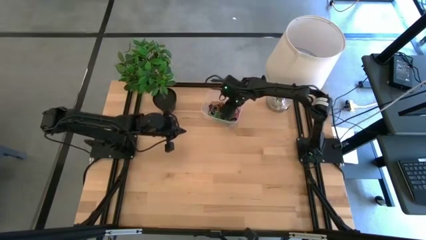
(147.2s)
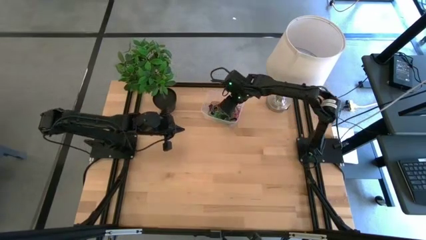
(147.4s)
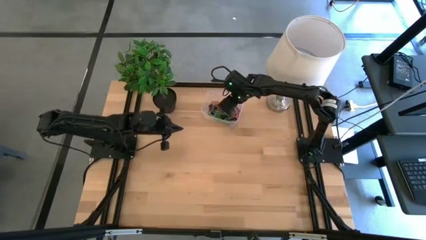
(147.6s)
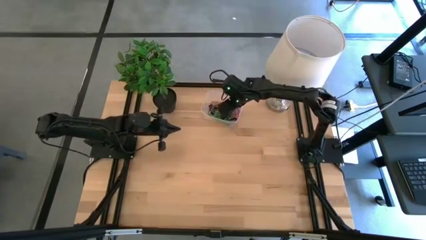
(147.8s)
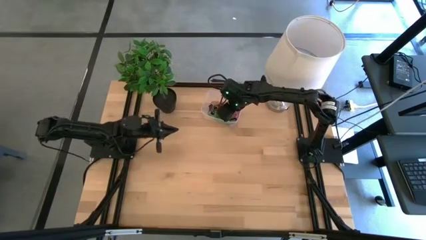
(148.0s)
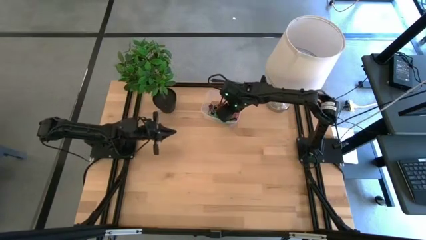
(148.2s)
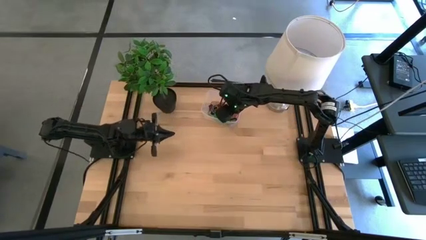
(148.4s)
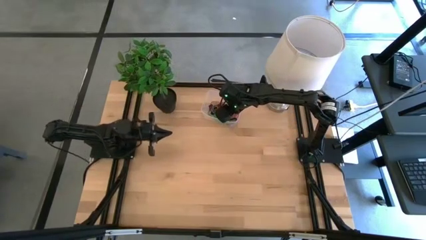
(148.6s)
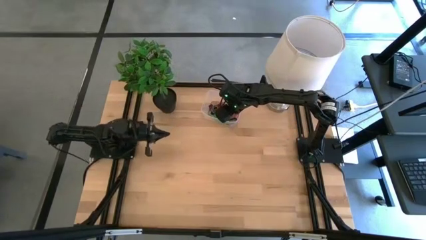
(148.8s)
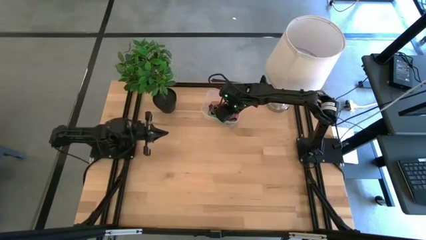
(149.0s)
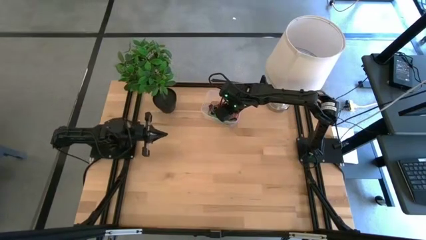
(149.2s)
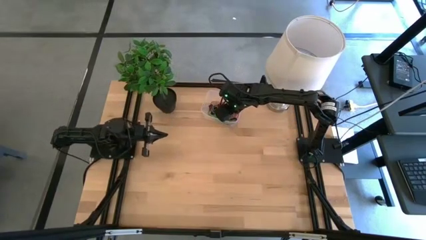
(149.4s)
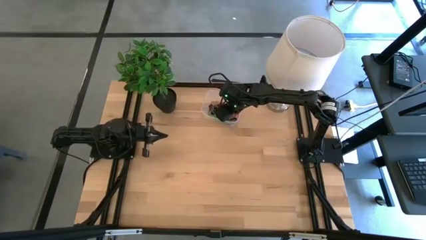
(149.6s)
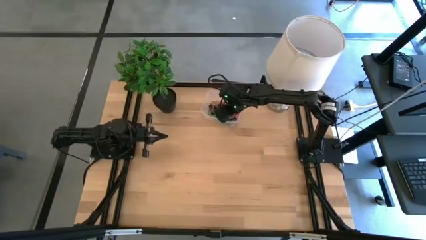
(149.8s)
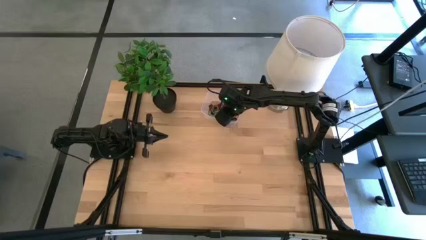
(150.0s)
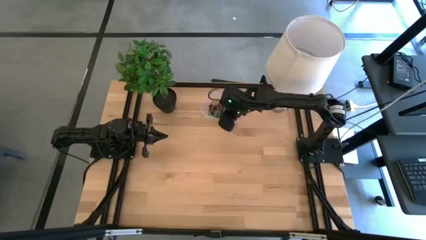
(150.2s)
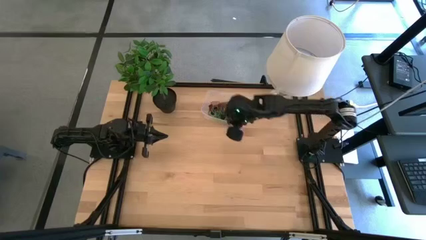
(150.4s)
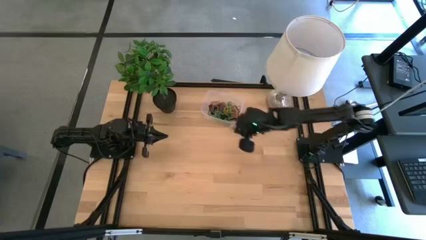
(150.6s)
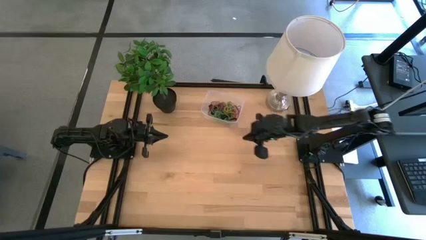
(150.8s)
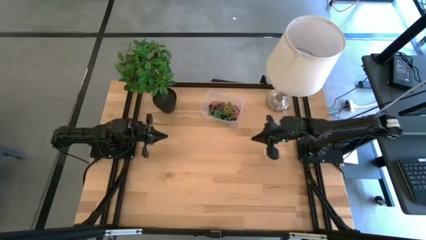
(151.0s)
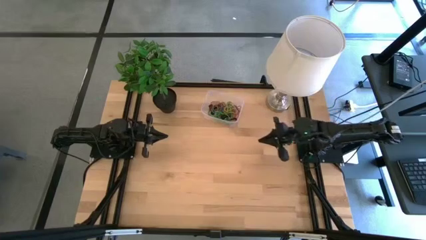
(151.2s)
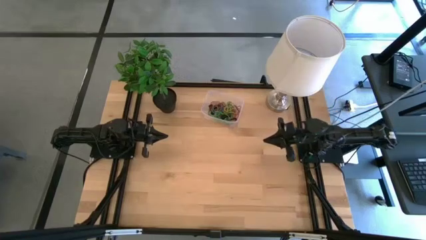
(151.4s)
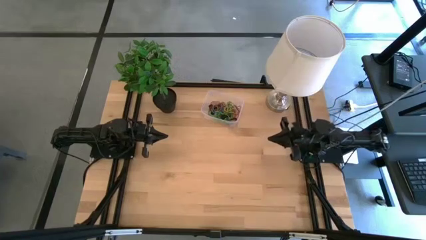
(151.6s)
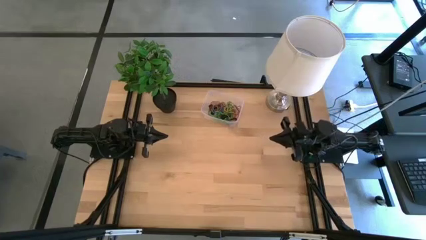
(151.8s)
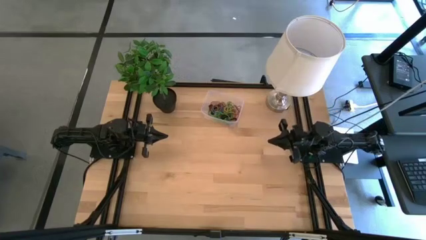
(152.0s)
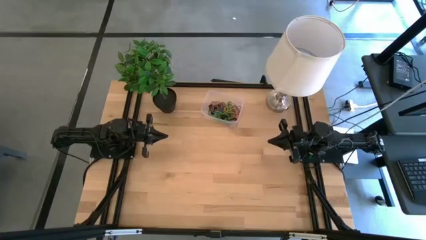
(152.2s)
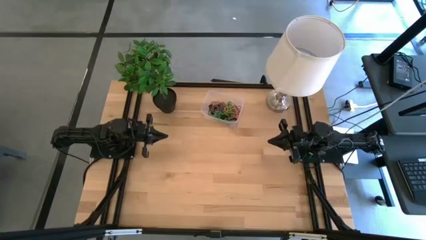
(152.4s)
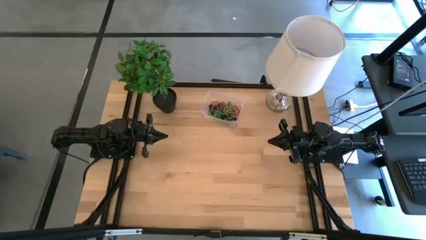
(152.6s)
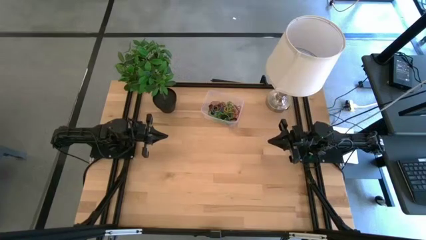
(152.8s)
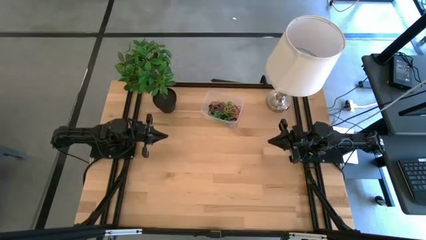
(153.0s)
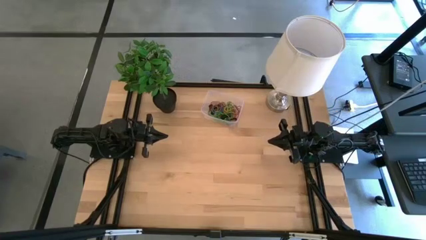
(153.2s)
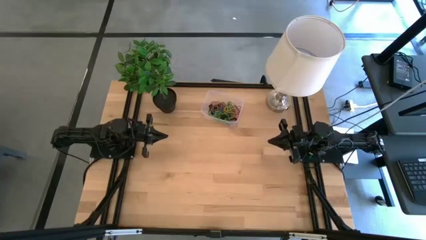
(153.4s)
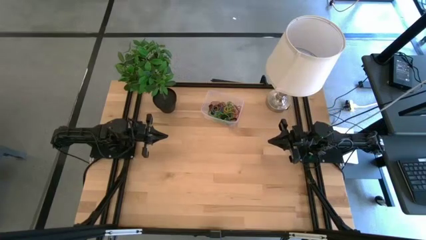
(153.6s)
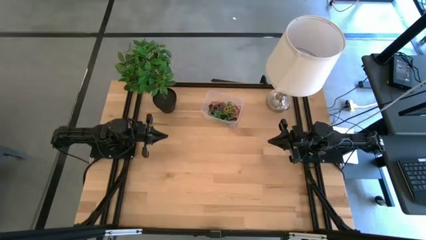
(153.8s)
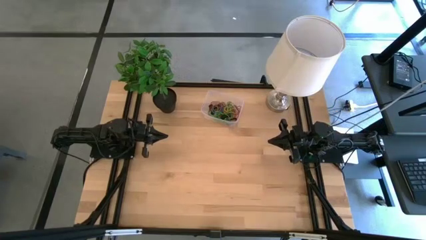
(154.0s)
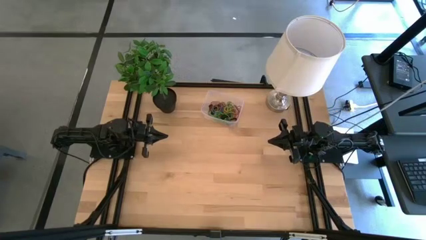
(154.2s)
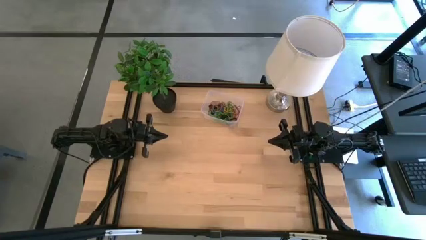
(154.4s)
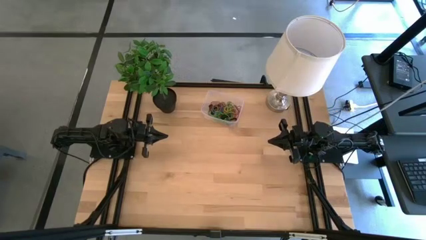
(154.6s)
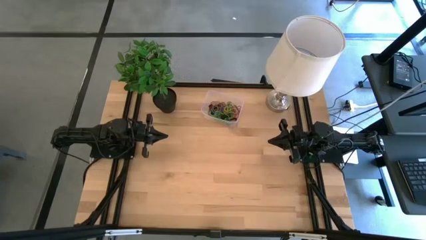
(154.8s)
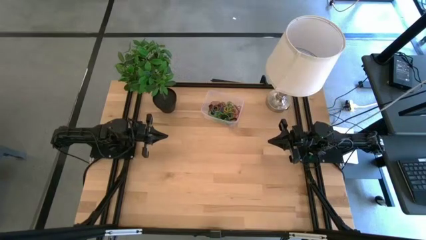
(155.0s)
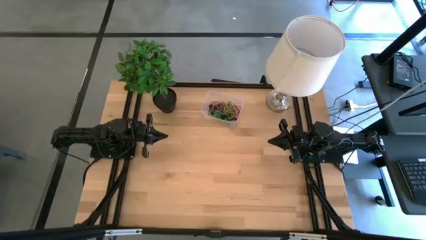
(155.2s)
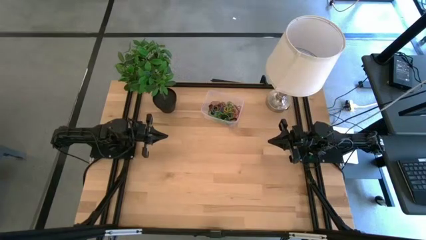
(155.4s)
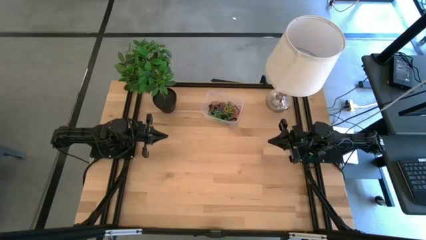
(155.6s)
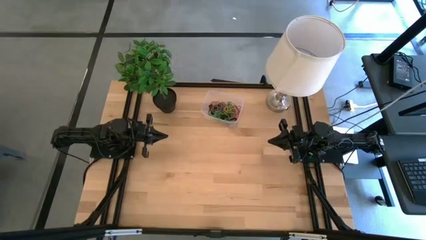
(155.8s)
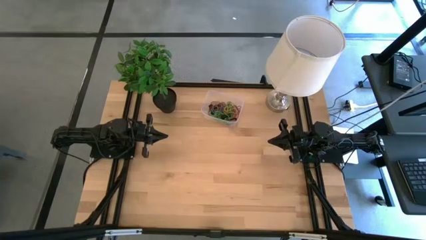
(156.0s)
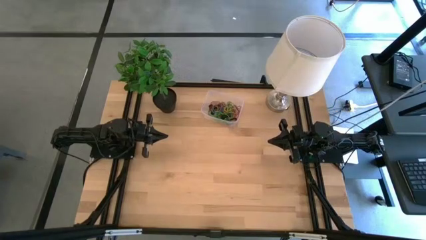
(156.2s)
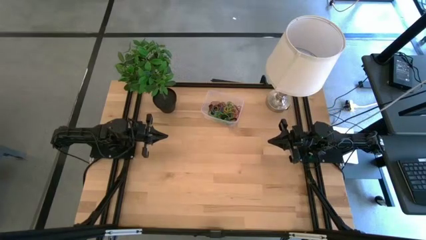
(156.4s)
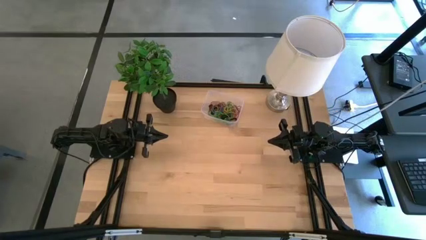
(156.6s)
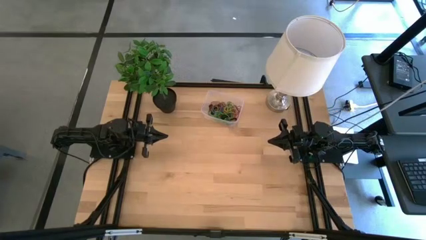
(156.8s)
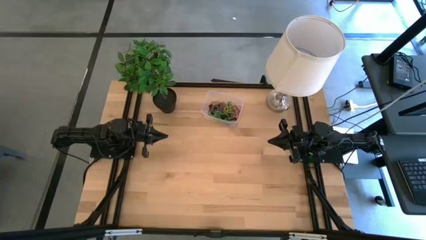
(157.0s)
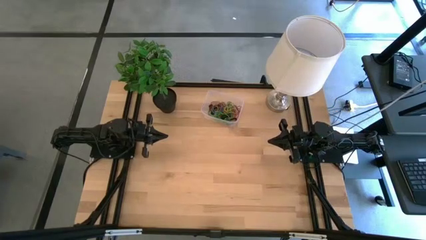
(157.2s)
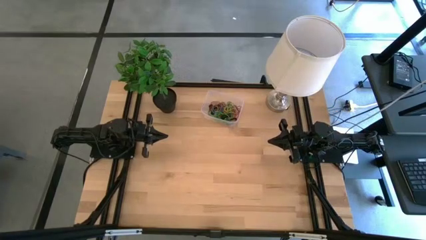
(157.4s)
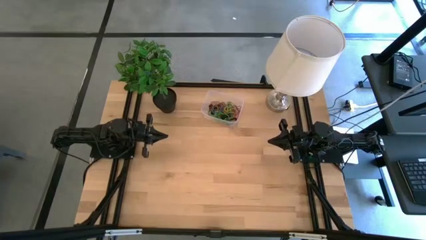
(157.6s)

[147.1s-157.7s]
Task: Pick and place rubber bands into bin
Return to Home Position

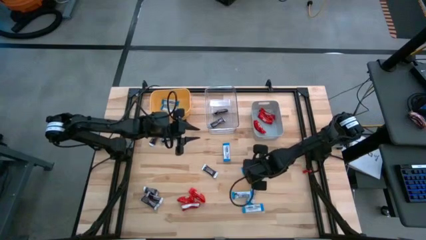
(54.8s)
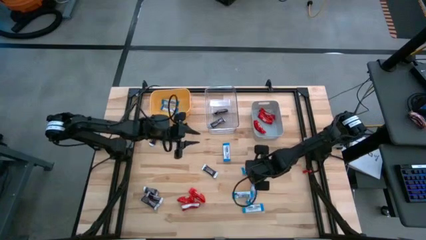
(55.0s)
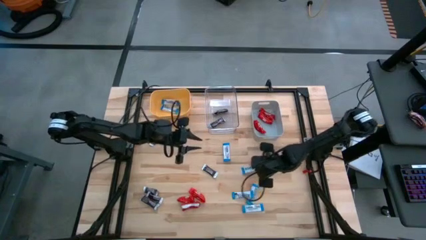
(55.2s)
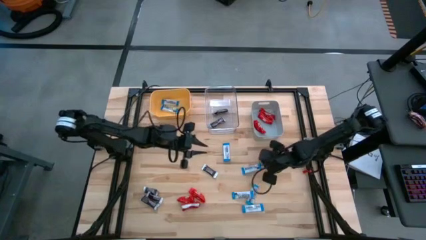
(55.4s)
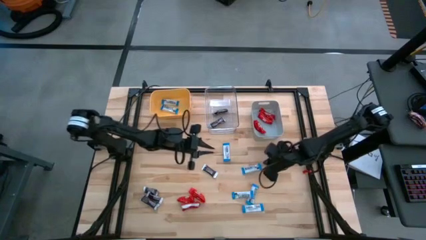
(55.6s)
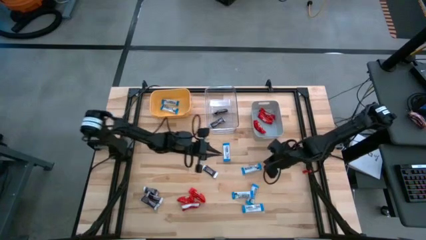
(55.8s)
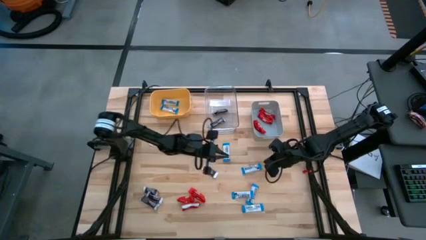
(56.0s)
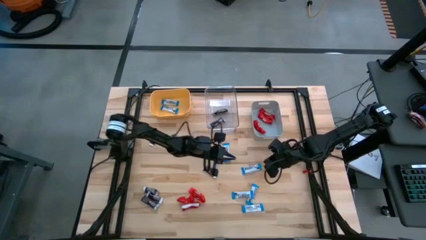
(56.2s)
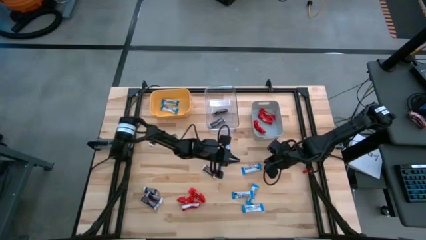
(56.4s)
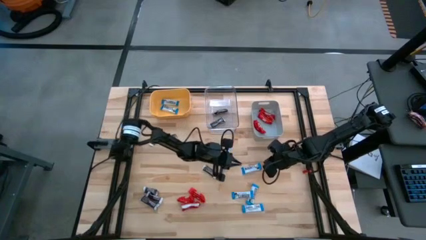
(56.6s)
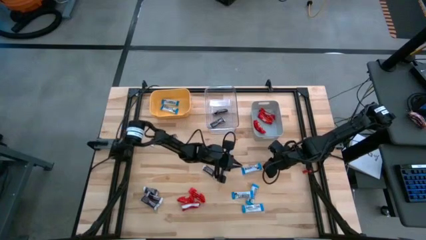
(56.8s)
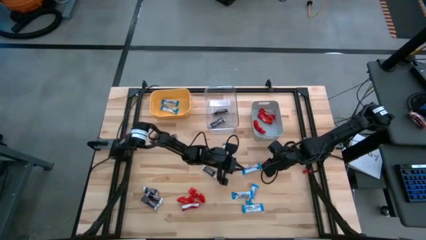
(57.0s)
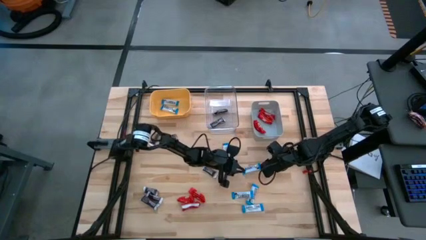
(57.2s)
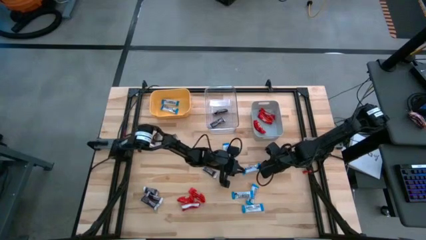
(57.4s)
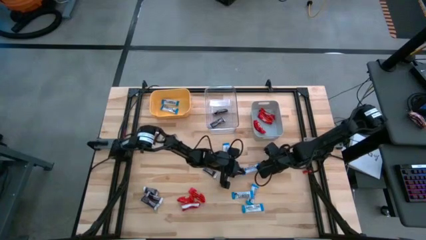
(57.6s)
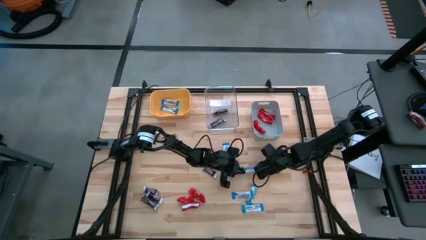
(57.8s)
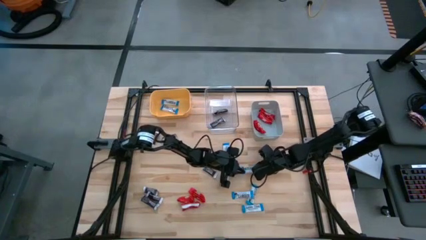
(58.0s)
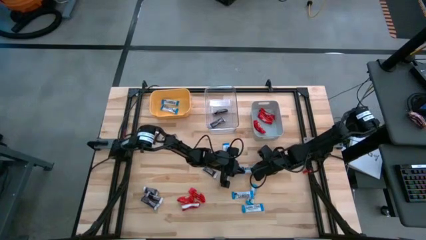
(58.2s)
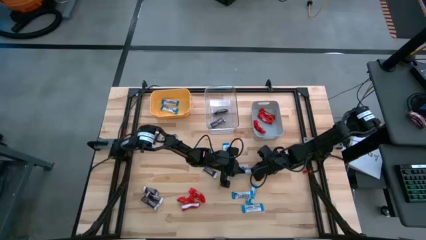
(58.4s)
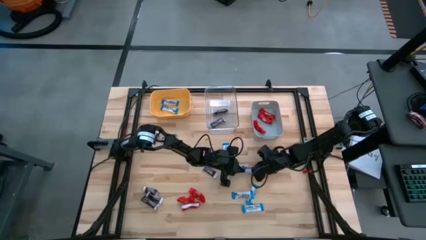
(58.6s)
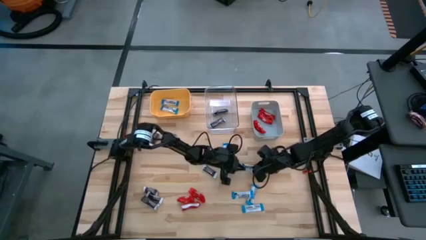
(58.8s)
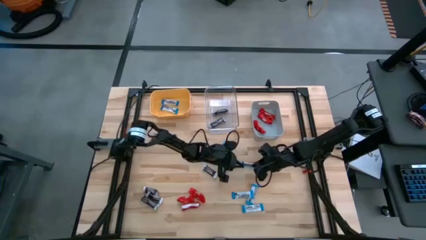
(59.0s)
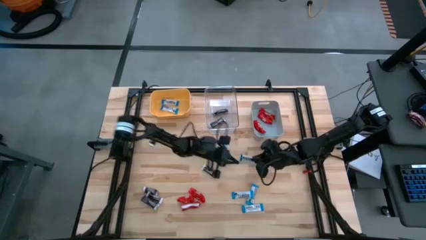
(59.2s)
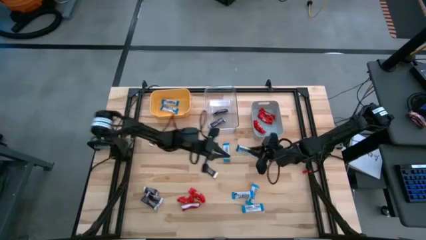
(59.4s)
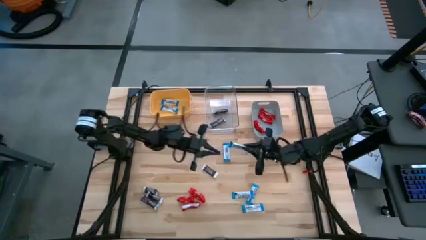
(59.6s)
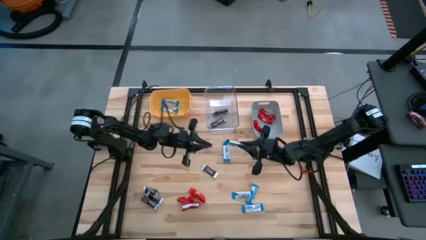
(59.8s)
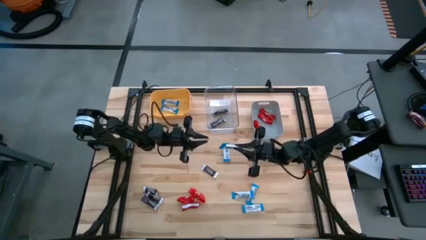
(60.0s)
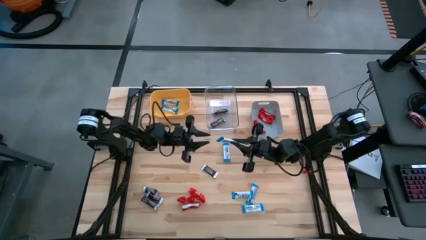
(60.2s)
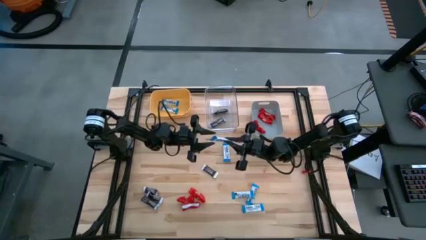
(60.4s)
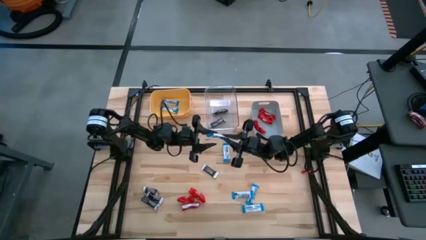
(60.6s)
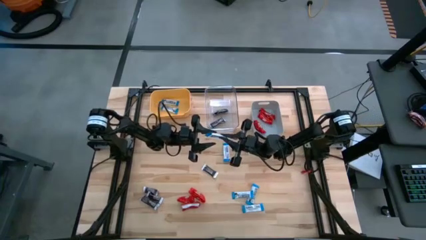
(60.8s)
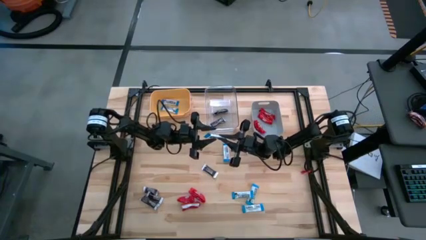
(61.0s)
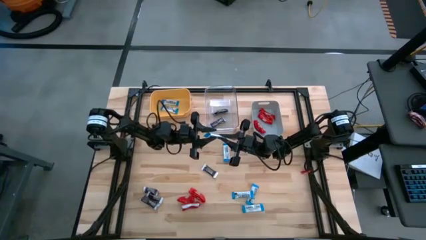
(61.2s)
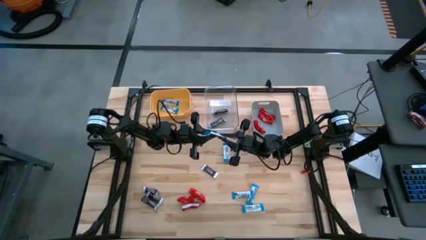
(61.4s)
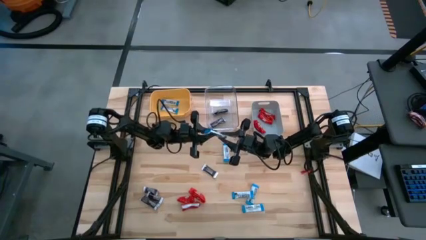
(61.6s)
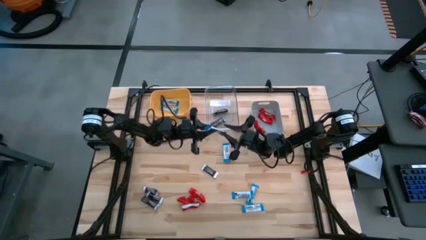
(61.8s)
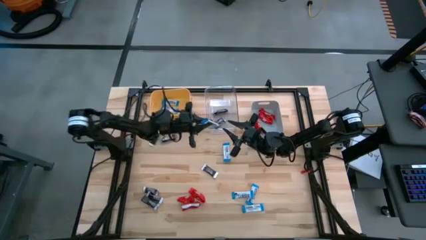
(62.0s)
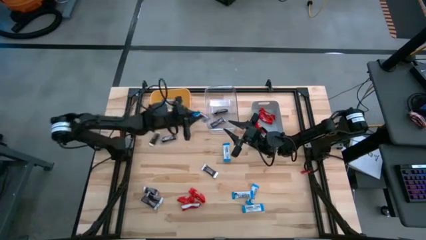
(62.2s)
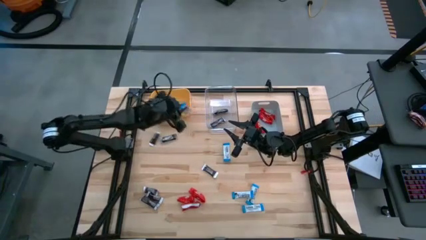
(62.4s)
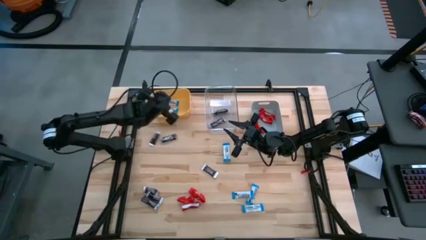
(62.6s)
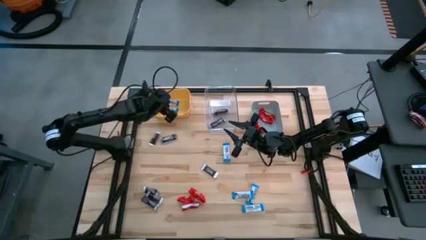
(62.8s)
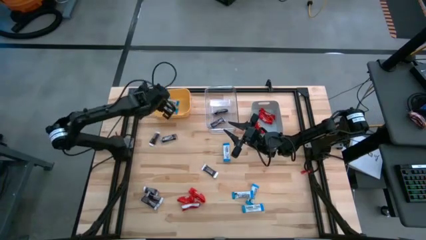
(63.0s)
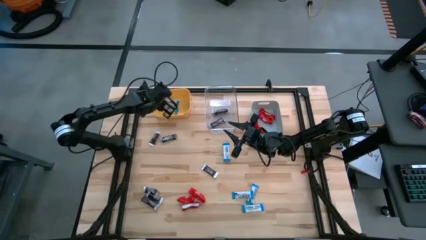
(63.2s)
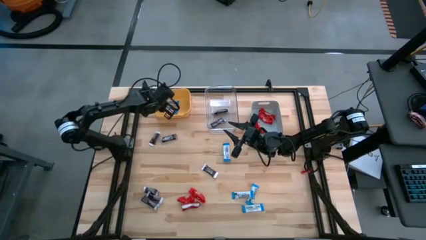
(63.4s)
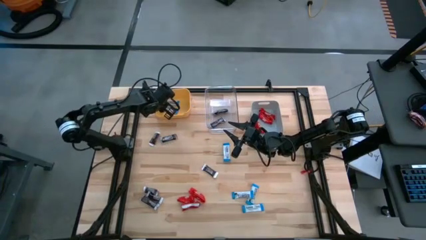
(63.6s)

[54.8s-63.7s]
Task: Sort candy
Put the white chocolate into the yellow bin
